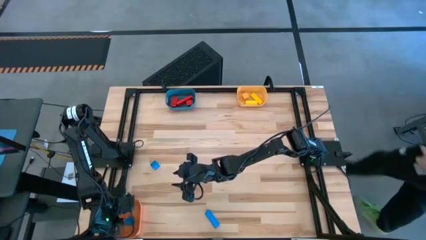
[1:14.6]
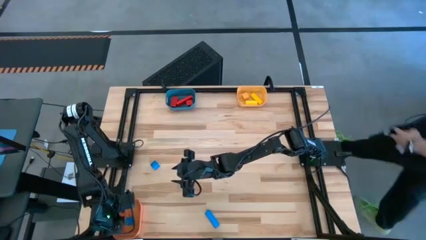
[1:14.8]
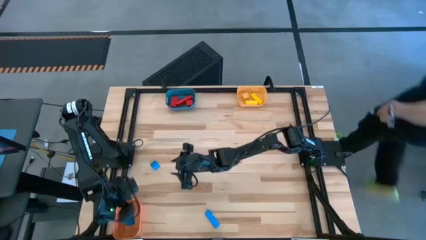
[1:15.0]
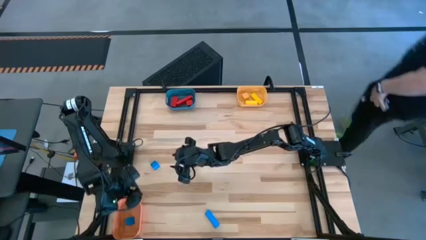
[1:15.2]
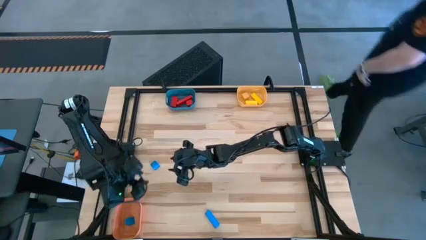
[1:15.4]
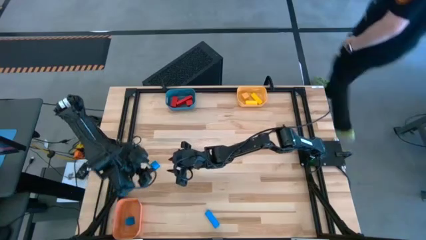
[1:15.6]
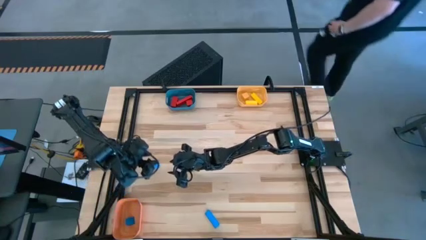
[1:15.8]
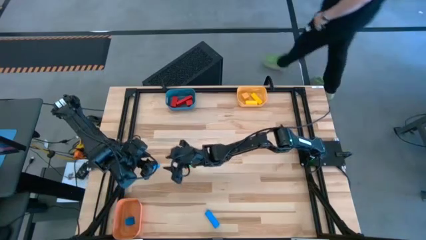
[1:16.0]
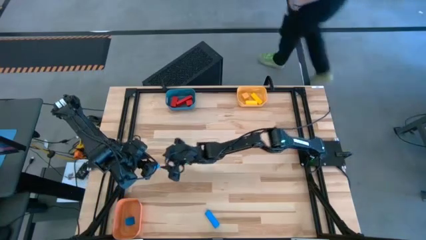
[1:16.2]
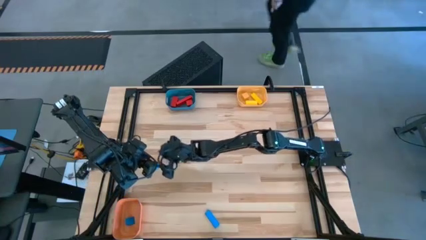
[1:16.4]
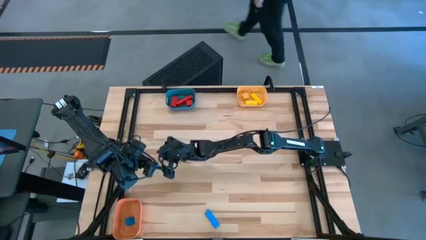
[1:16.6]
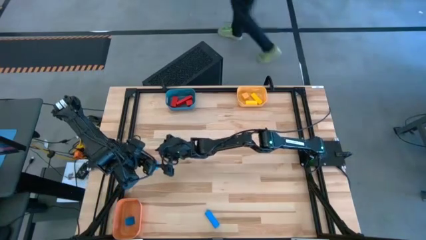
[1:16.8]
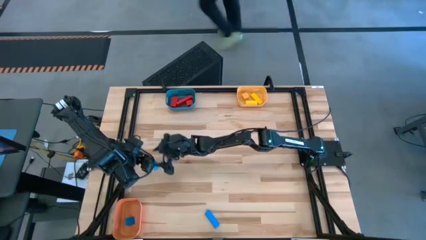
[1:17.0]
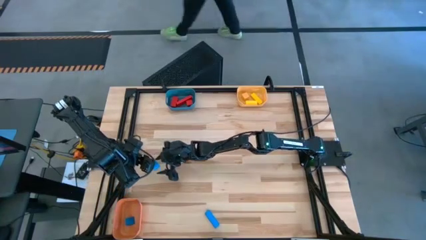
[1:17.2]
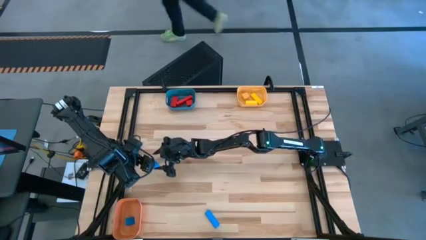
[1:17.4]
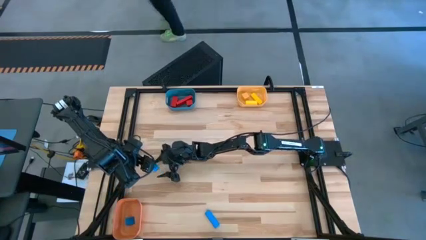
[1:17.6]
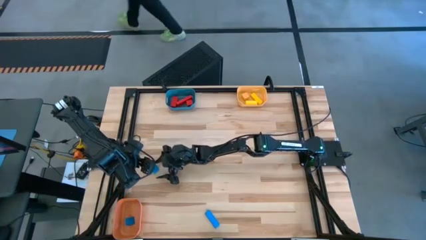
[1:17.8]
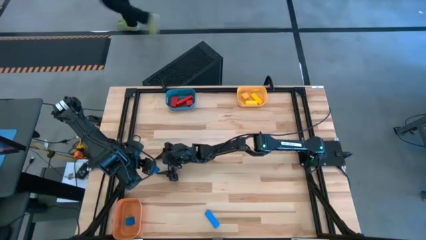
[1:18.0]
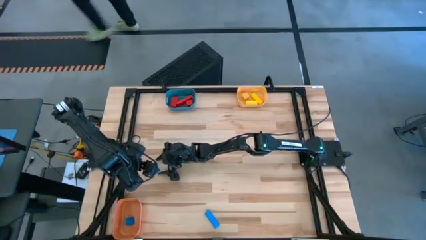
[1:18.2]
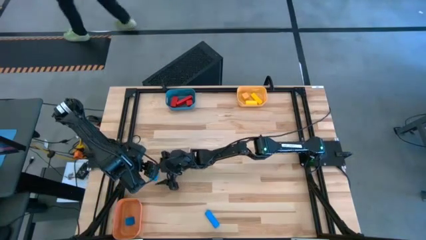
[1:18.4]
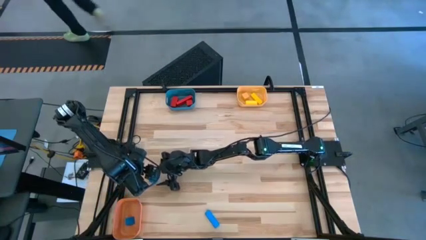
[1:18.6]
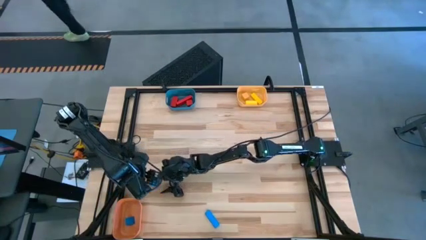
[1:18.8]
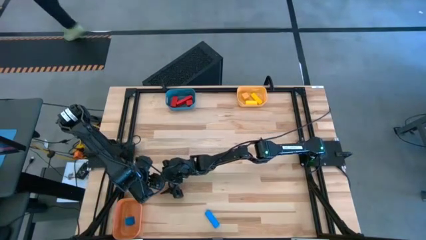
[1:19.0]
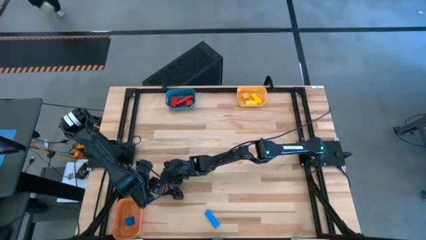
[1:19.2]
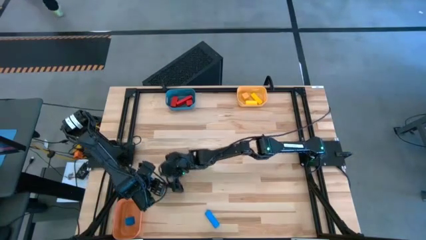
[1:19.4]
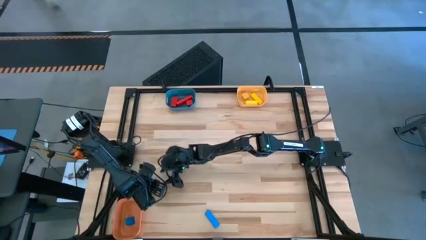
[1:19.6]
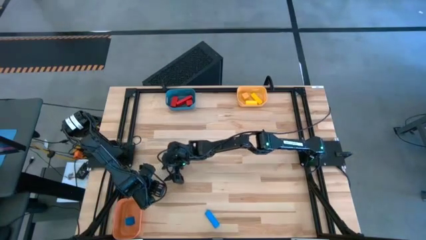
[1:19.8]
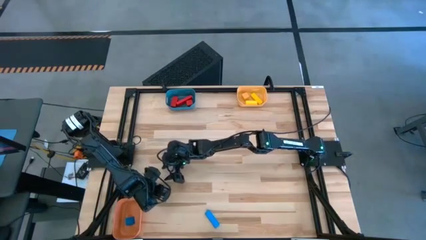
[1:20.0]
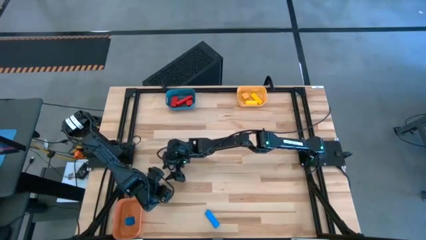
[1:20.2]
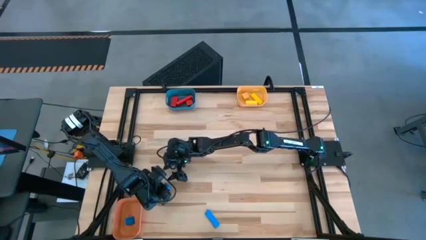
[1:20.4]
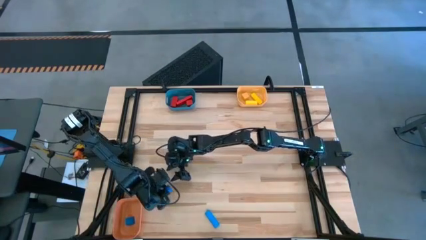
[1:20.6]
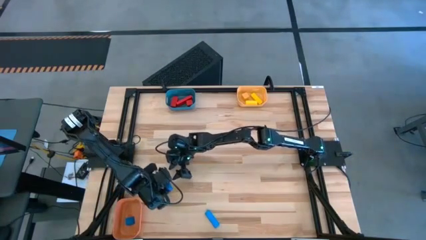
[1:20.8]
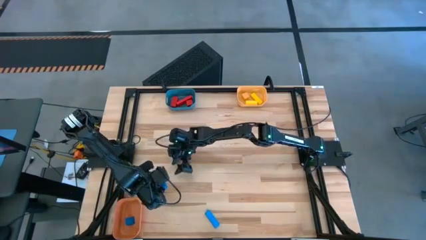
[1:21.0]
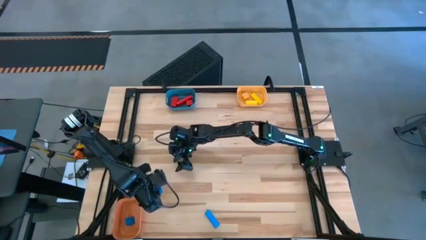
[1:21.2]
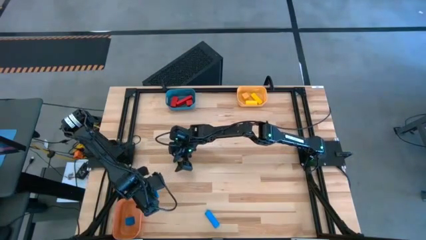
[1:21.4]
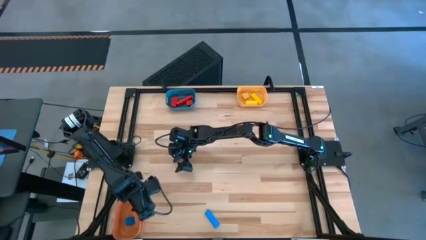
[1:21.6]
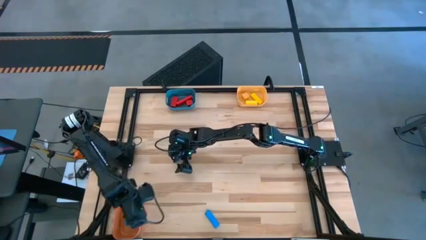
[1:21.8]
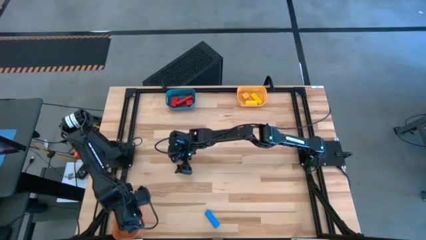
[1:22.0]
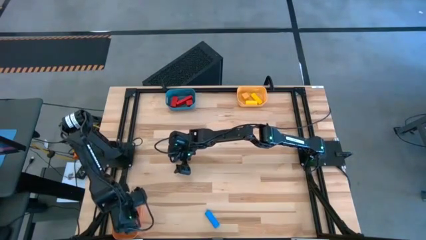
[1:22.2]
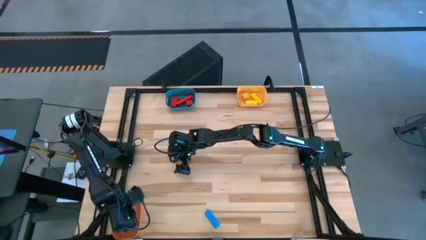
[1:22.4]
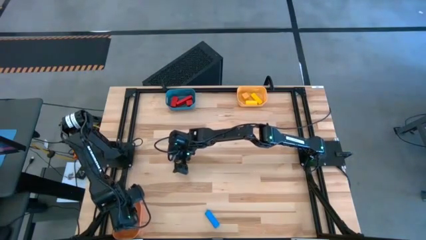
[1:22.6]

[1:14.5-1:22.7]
Task: Sort & place blocks by color
Put the top blue block into the orange bin

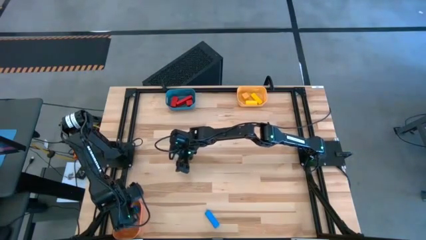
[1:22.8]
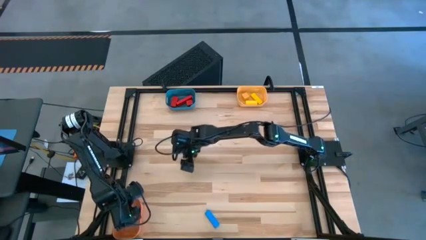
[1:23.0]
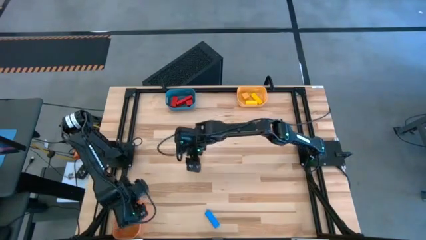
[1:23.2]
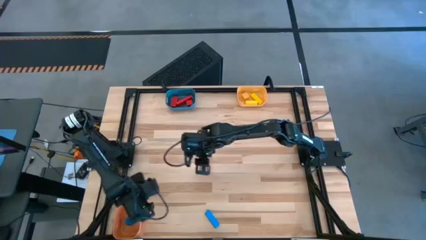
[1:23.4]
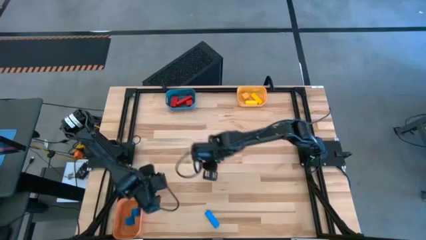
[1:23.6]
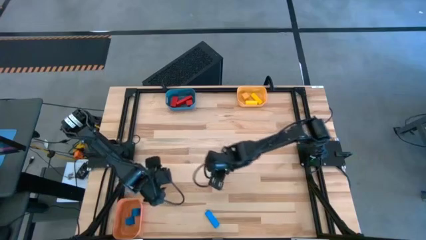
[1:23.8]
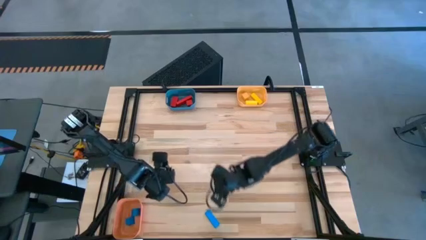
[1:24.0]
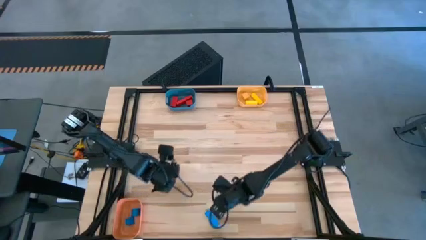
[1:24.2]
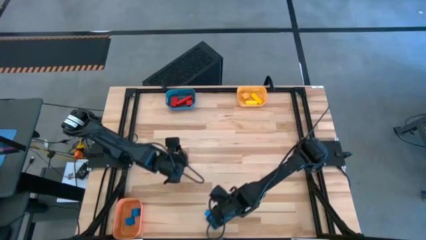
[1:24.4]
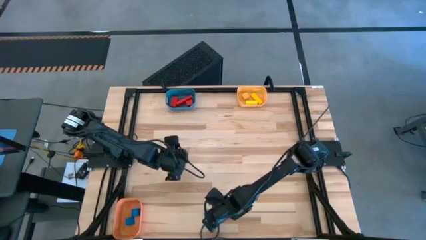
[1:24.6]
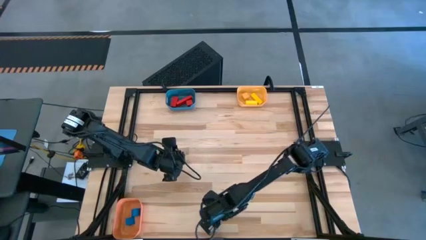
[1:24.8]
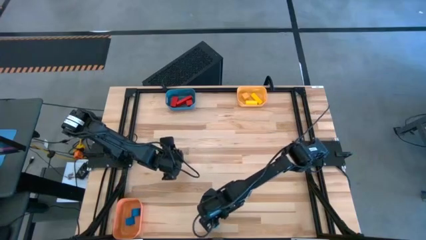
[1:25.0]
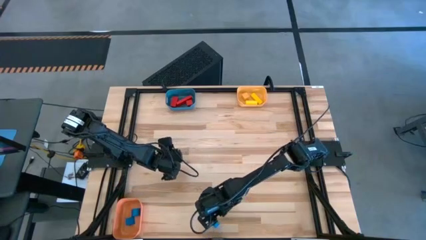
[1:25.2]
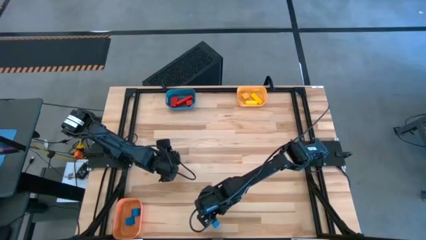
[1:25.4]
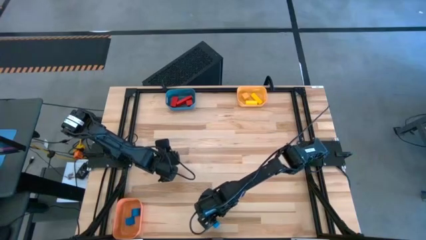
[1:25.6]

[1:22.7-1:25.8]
Put the blue block into the orange bin

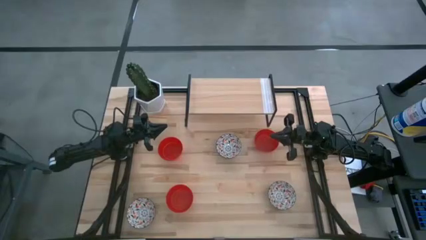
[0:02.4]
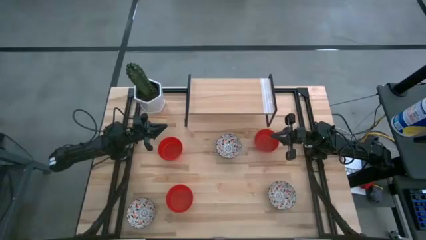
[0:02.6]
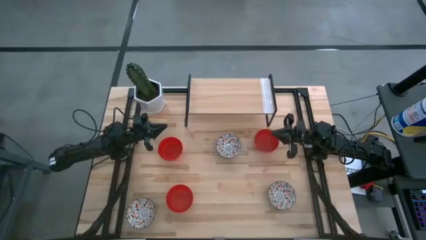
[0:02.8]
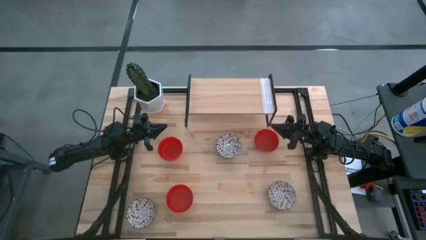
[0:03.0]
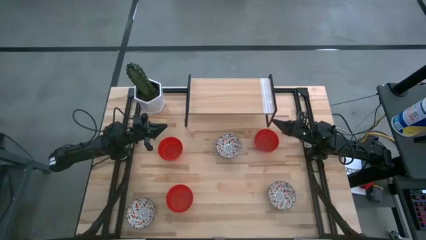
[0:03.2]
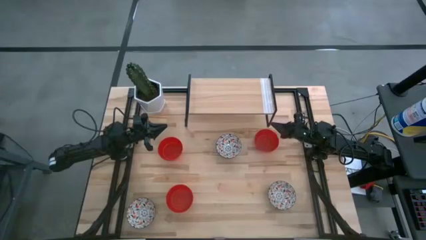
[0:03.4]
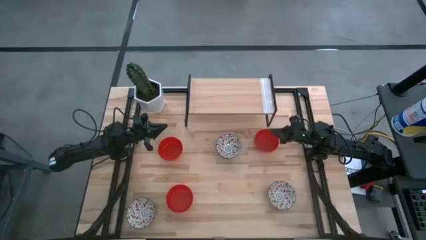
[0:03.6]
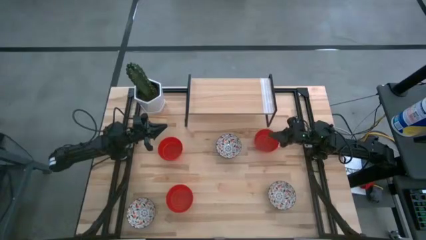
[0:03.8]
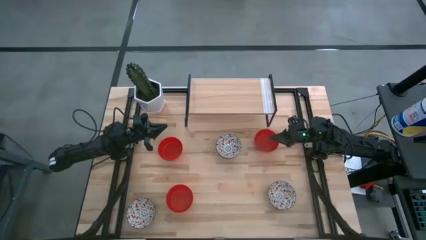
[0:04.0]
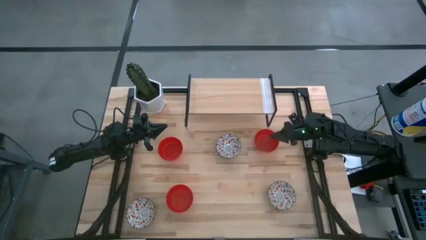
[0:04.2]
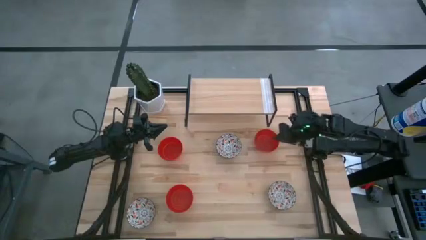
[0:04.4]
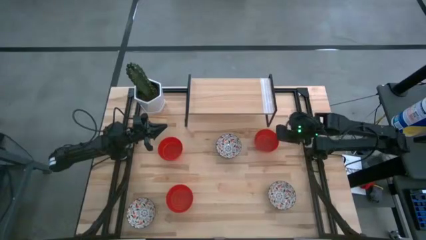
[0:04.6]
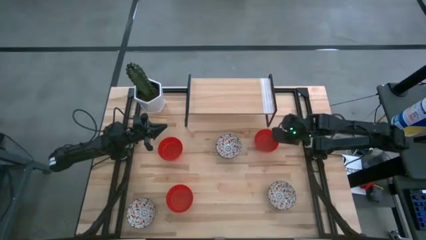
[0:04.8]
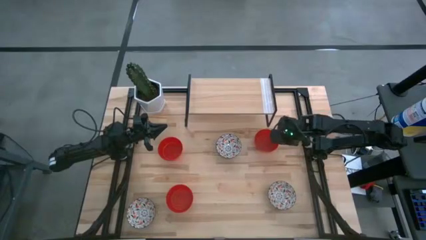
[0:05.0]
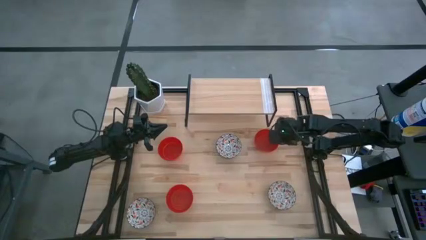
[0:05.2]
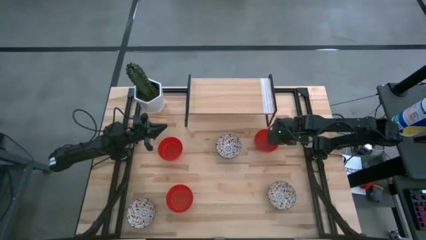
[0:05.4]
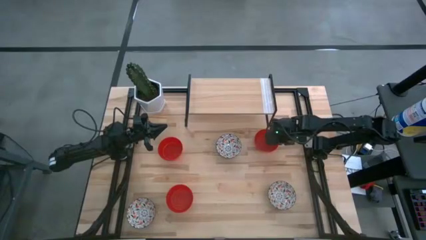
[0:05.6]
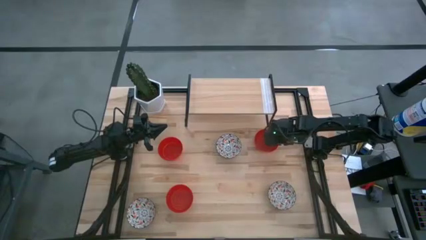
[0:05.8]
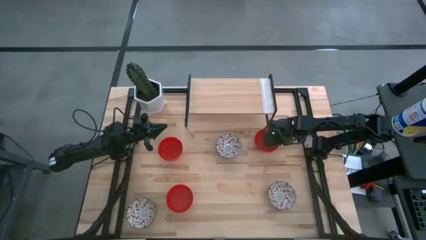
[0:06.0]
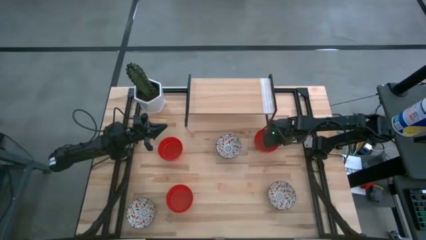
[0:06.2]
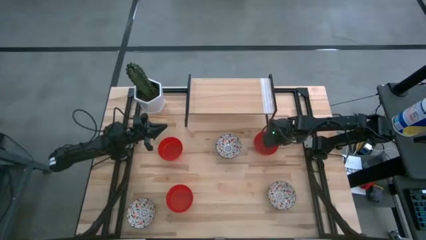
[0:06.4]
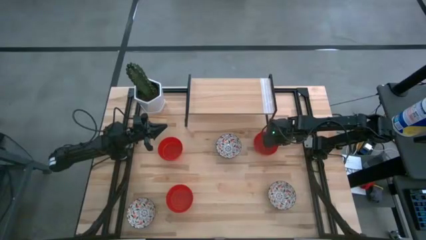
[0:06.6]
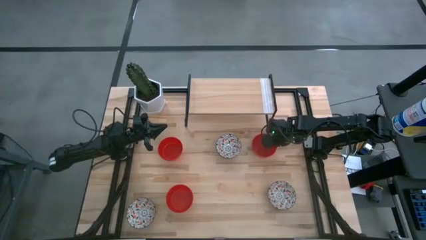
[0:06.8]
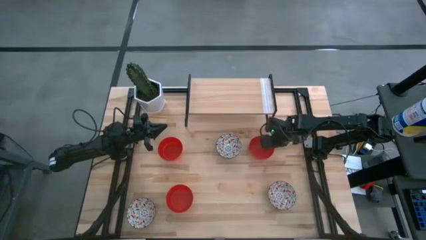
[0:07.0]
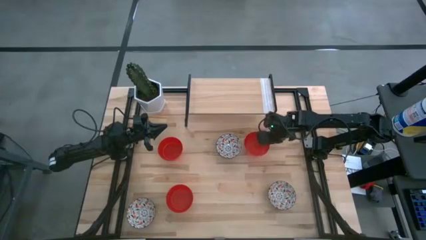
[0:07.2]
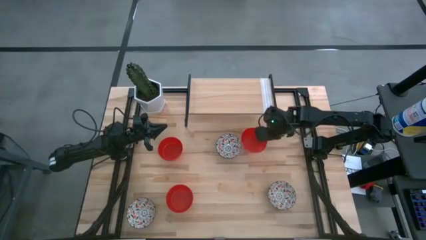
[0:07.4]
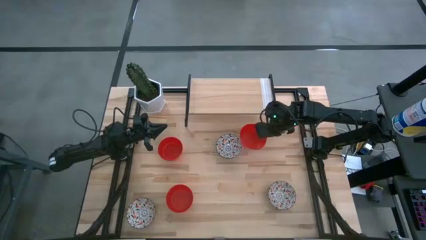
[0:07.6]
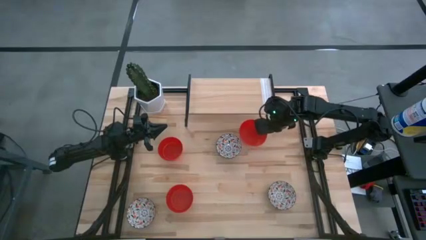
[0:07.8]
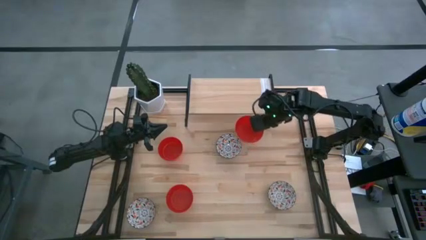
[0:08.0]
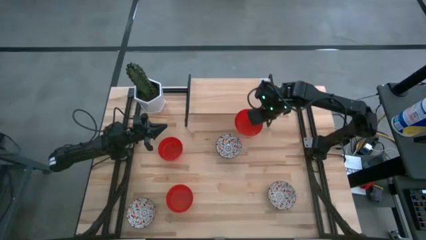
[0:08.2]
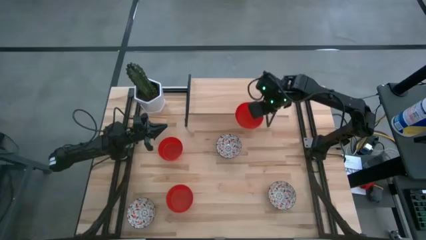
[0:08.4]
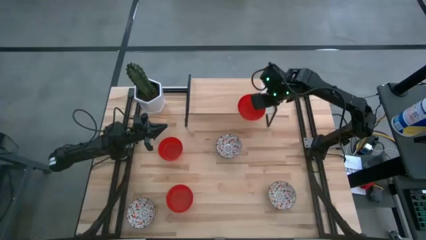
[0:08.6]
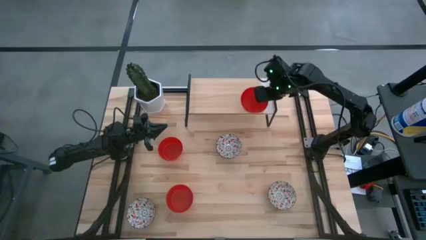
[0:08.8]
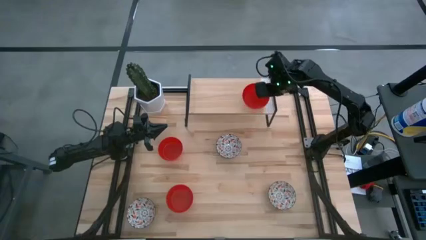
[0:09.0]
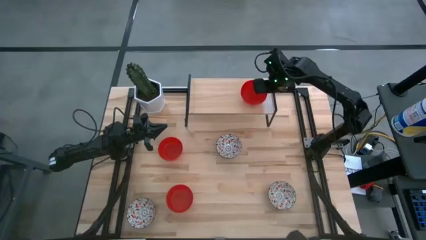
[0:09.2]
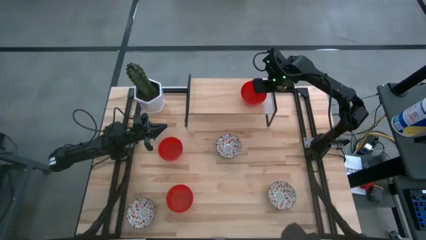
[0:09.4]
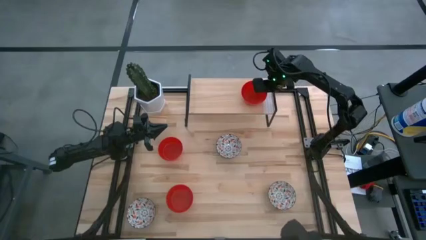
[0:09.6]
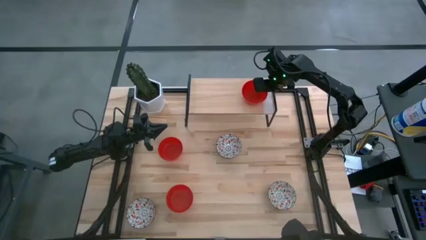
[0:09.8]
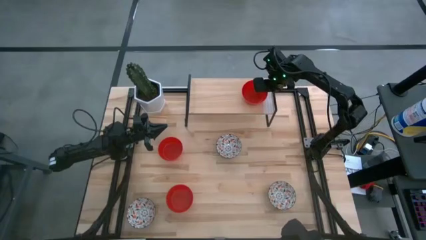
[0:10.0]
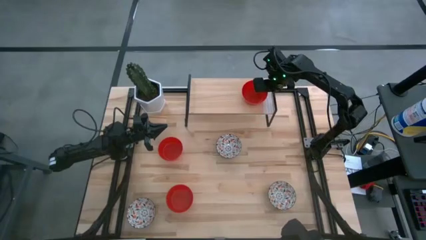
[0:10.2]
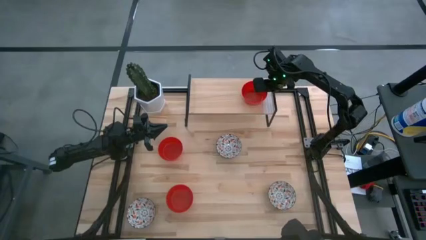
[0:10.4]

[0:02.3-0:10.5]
Task: Pick & Place Mini bowls
Put the top right red bowl on the shelf
